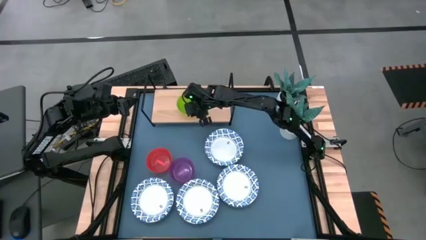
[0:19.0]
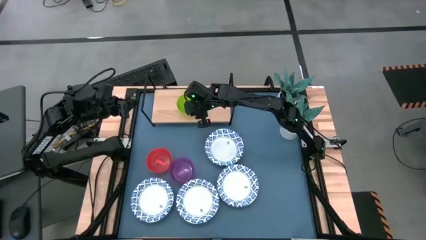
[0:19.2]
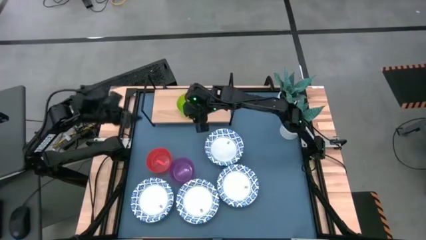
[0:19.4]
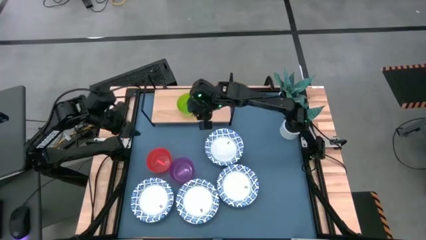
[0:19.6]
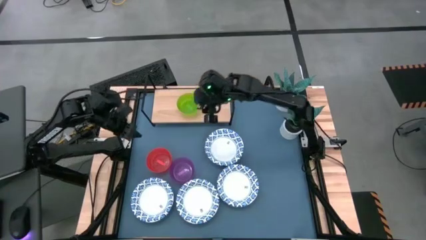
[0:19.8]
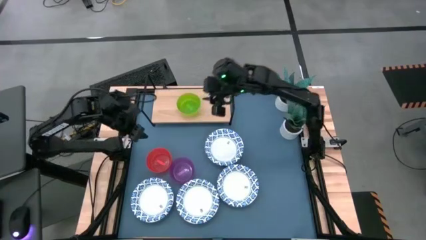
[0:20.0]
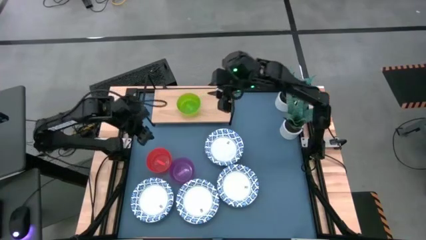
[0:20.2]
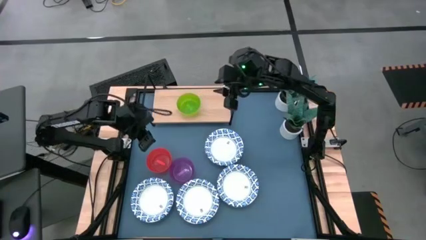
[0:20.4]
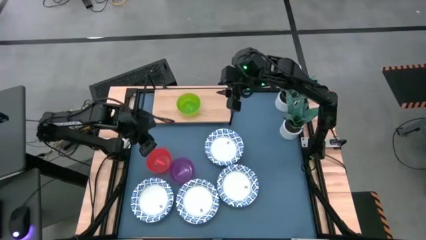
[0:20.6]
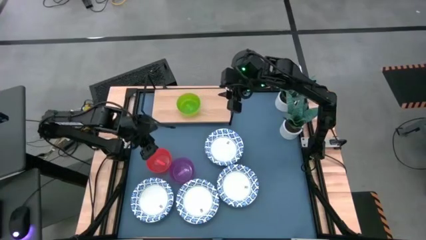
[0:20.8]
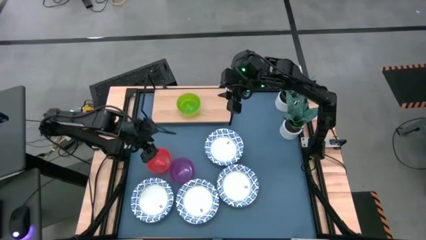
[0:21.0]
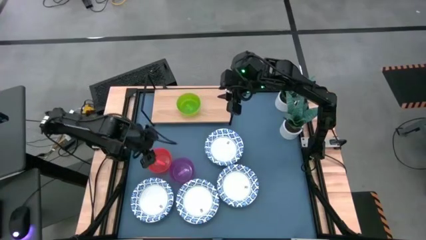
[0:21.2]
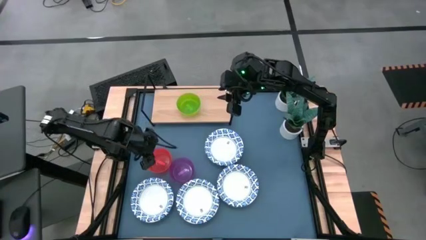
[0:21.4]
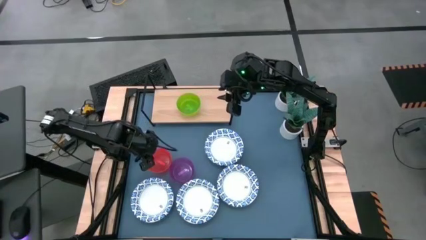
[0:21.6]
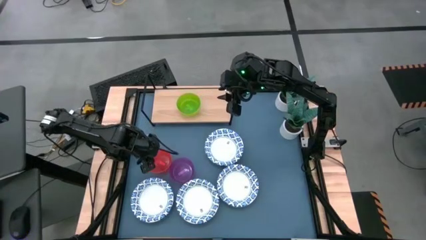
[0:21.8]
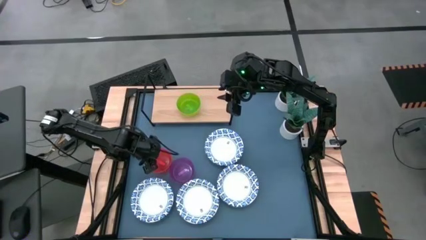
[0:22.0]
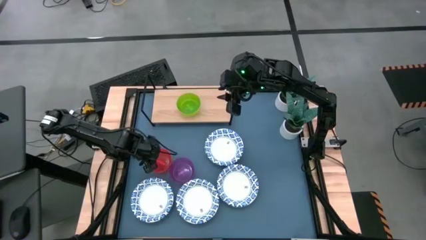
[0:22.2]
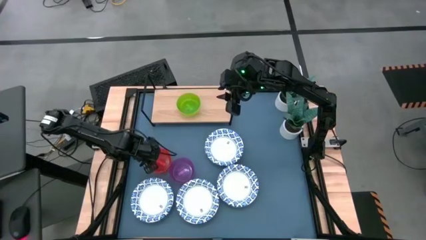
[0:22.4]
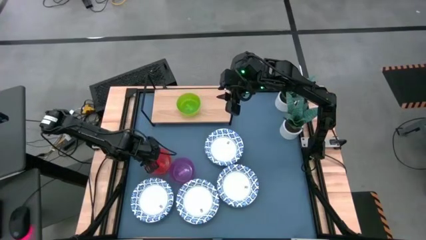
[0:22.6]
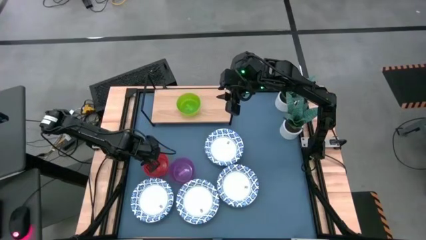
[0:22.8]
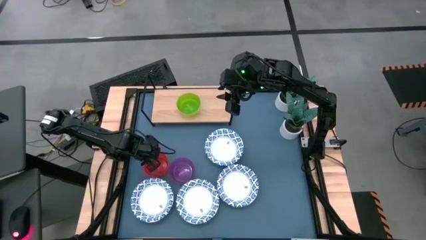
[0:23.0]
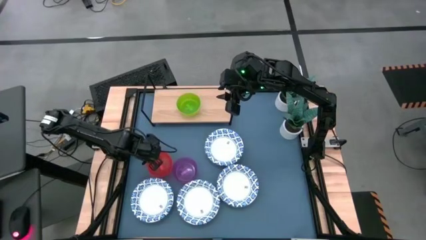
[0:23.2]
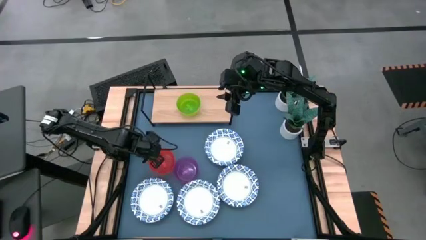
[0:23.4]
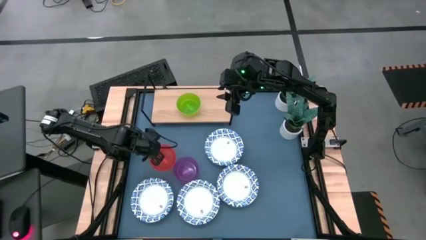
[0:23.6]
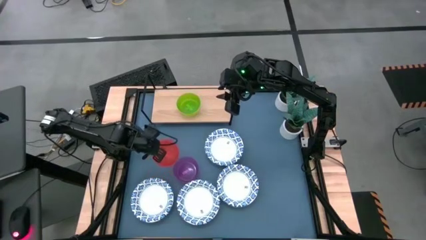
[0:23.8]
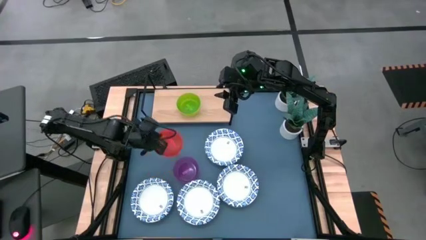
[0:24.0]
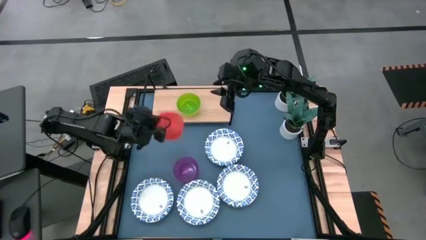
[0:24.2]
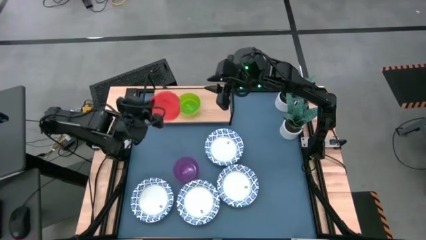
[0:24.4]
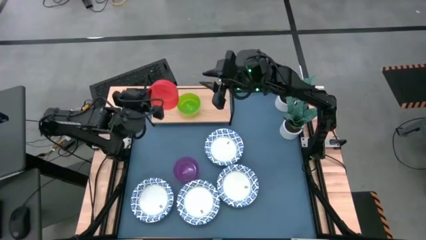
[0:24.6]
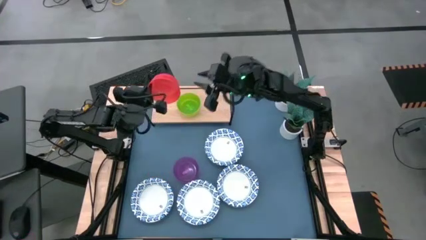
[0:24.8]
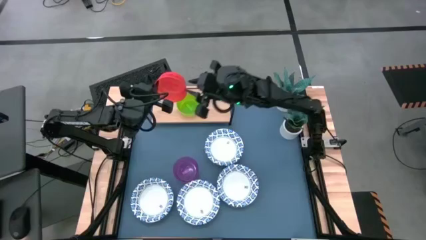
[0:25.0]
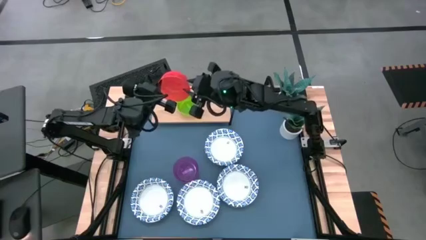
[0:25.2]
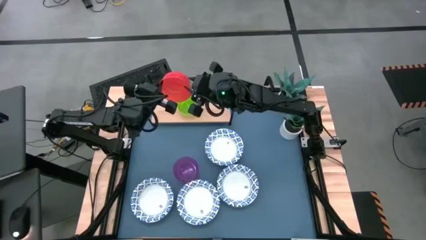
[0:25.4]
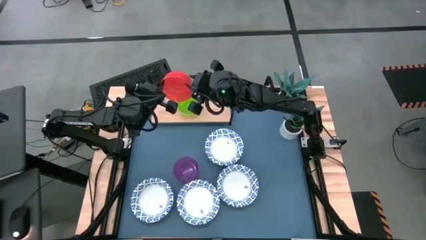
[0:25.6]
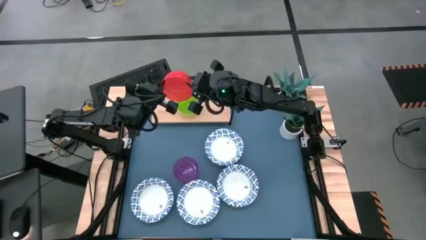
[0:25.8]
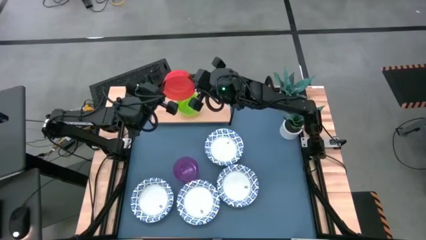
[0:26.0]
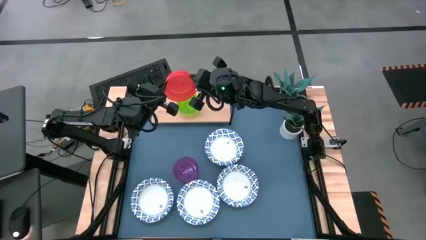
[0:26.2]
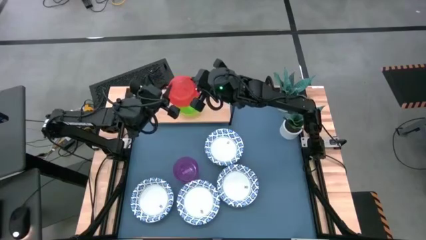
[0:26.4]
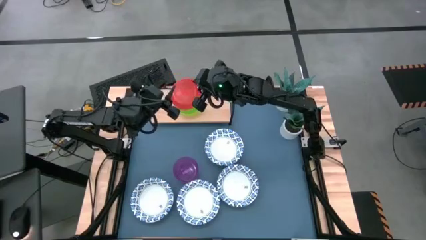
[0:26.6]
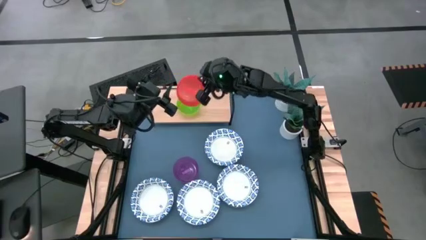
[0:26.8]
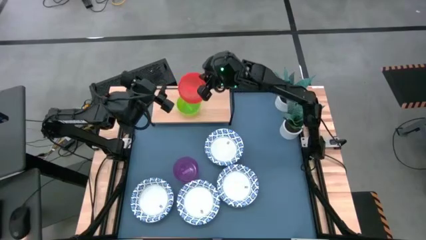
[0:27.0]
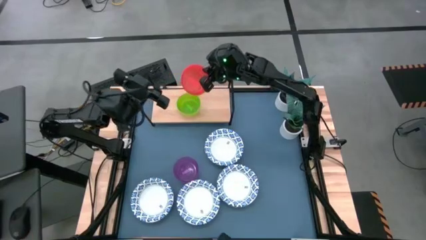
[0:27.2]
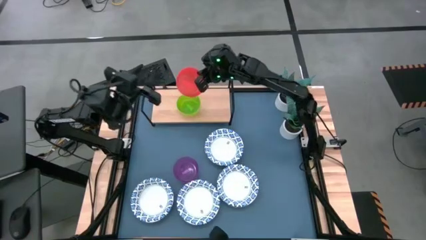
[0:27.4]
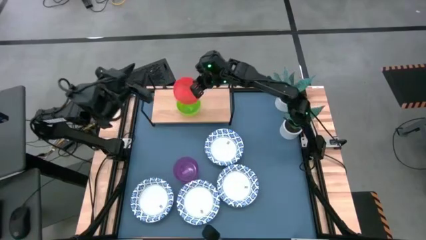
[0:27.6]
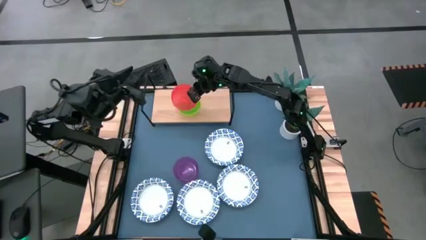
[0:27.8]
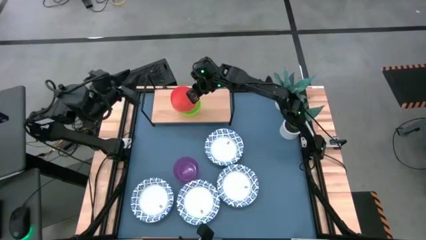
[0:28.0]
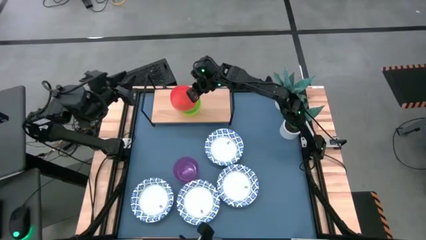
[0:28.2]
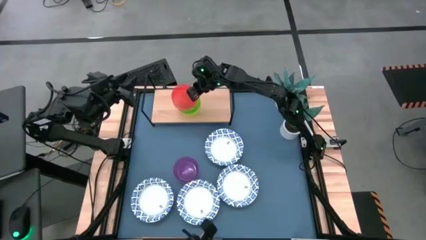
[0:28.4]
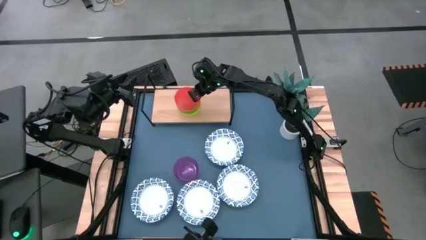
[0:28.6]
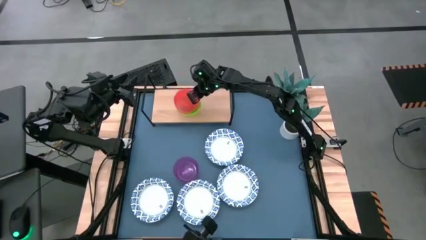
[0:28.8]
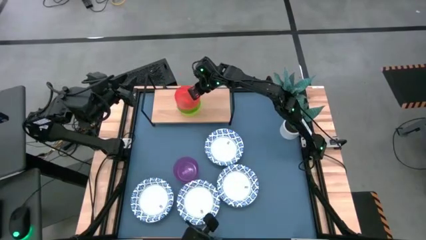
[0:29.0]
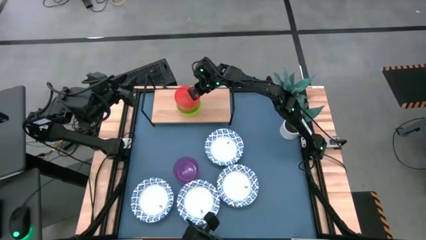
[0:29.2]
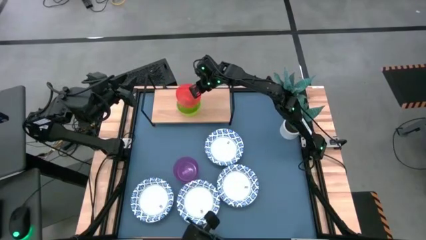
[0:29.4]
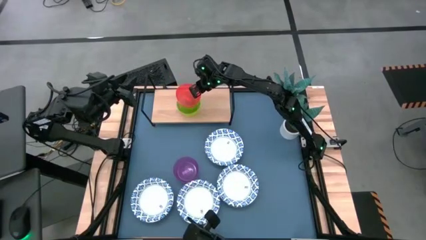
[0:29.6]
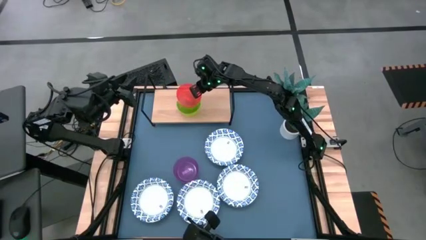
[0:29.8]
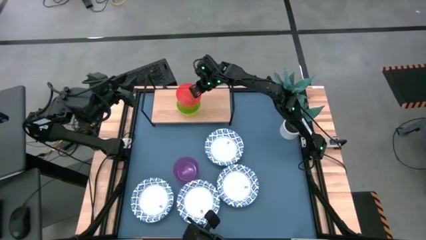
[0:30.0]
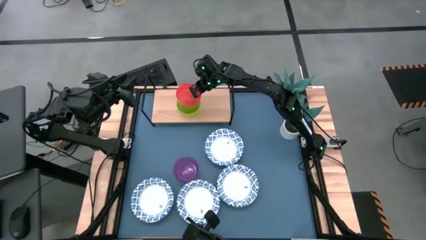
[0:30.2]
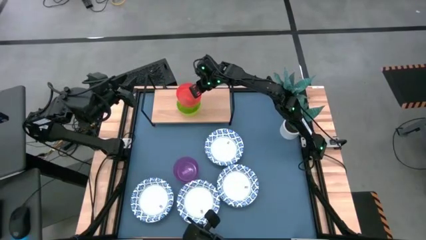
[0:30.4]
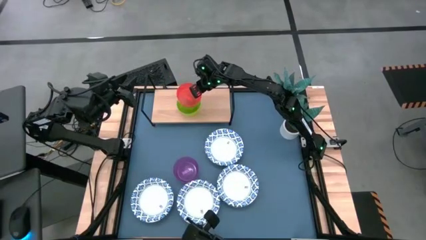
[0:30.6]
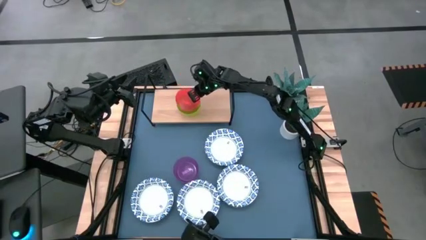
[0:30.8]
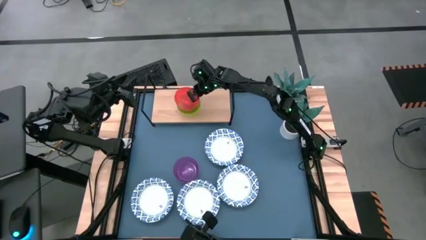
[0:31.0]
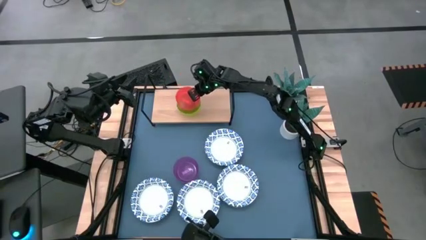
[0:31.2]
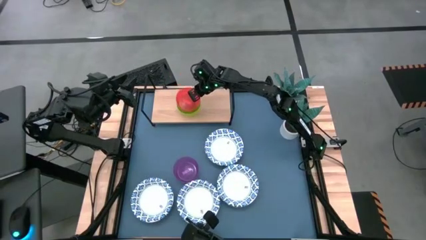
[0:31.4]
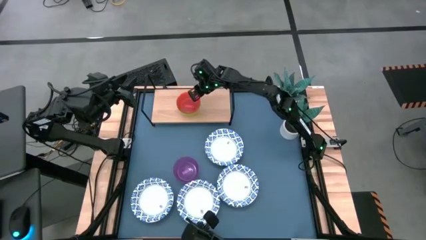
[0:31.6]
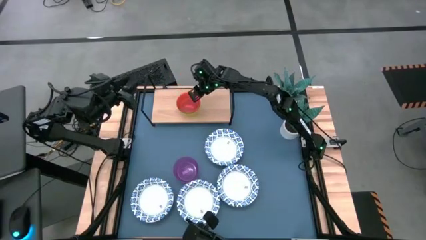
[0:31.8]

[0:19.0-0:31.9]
Task: Place and stack bowls onto a shelf
Stack the orange bowl on top of the green bowl on the shelf
